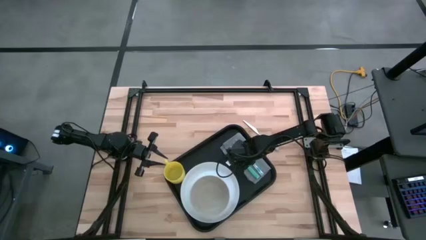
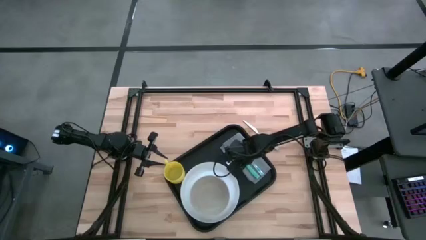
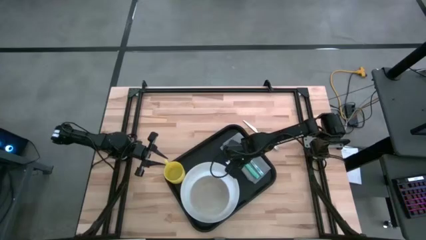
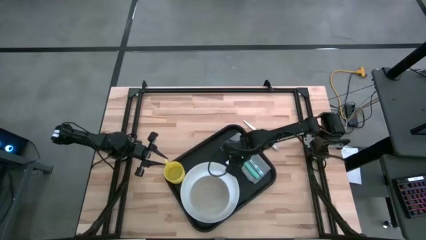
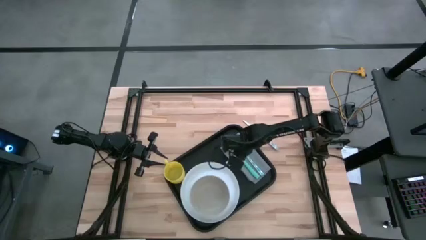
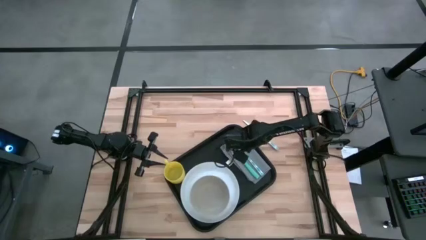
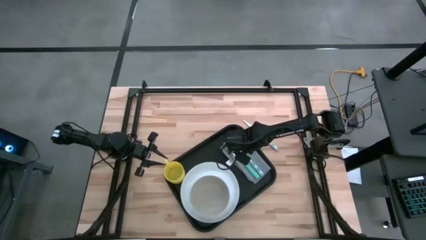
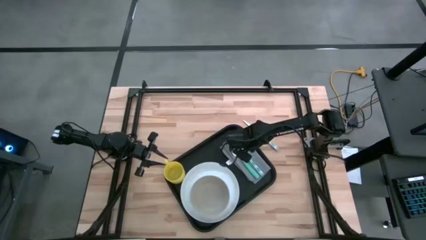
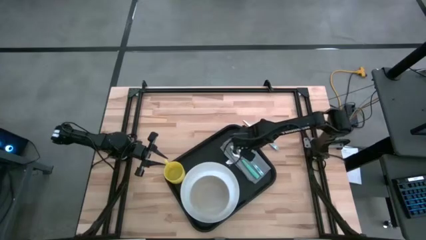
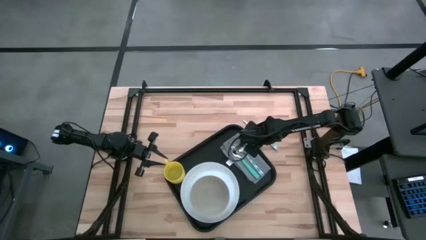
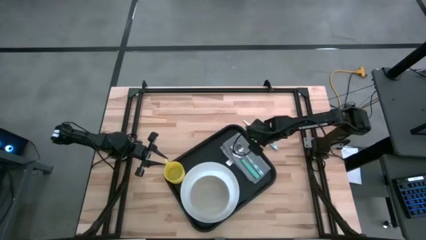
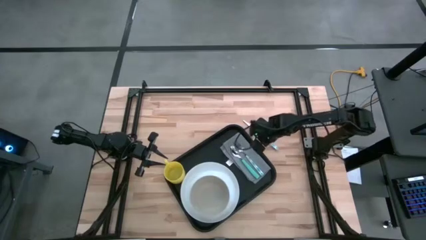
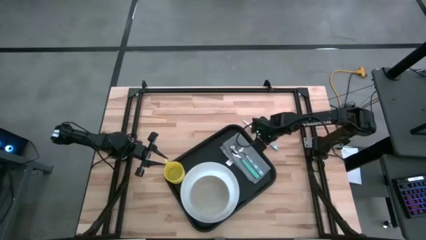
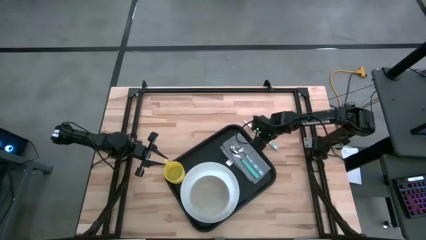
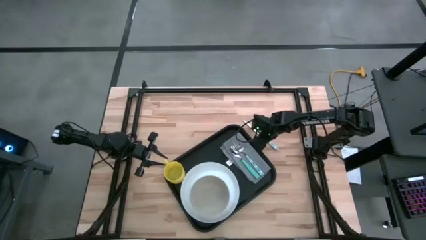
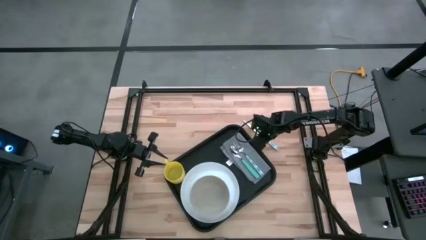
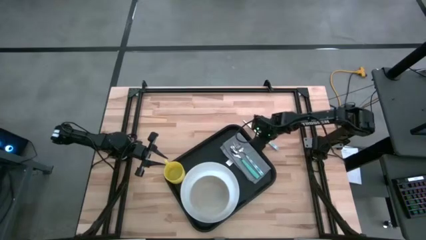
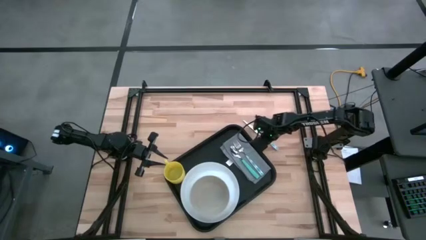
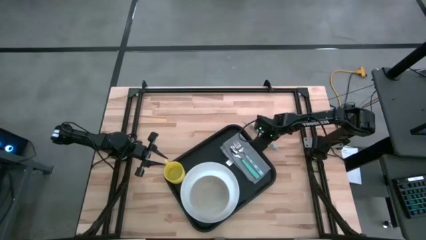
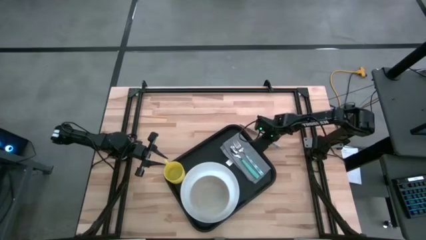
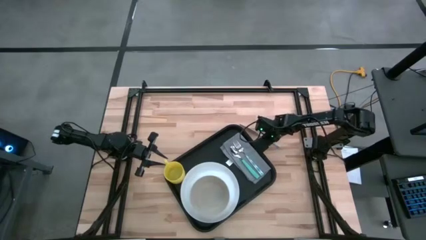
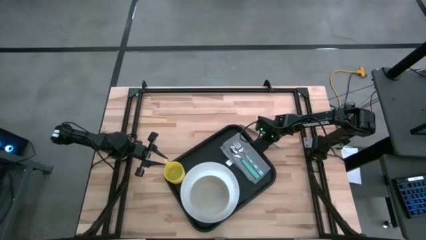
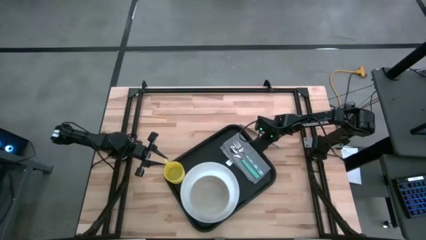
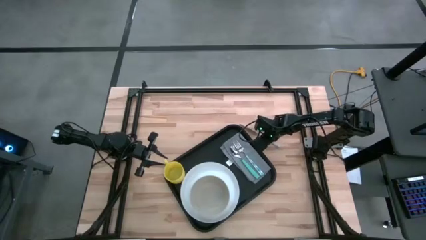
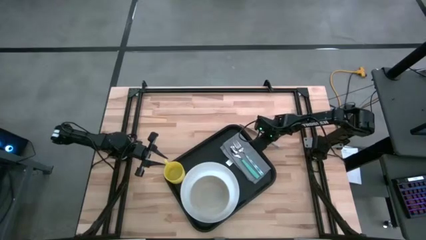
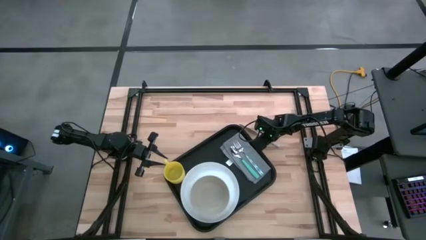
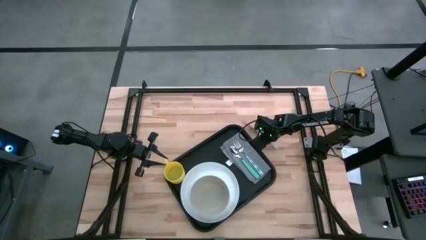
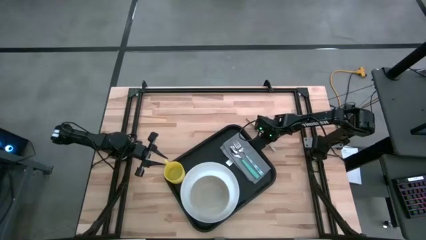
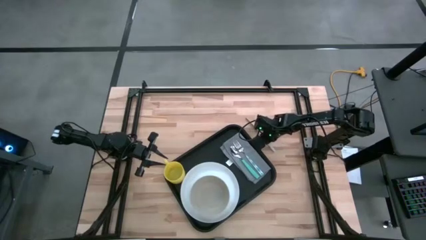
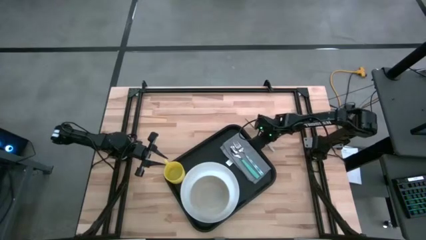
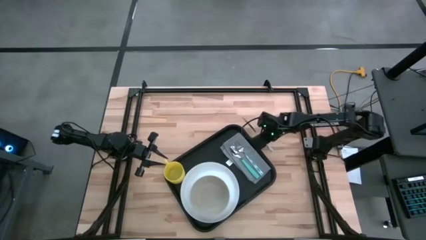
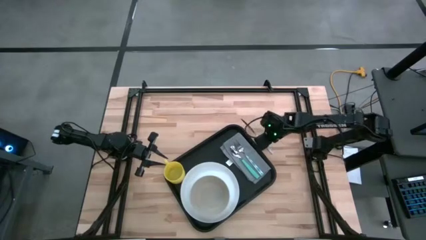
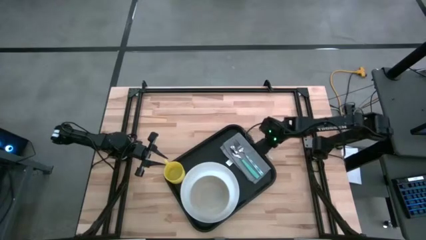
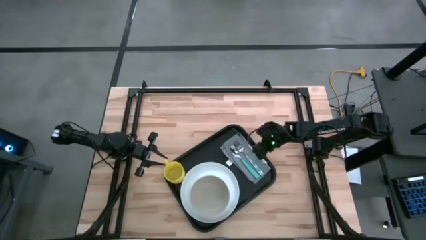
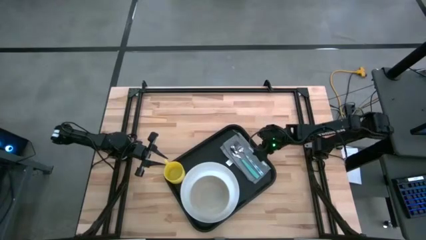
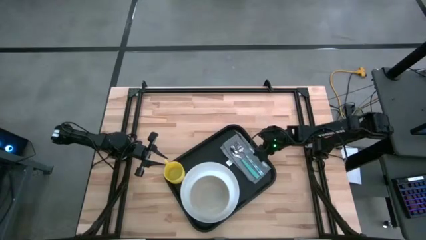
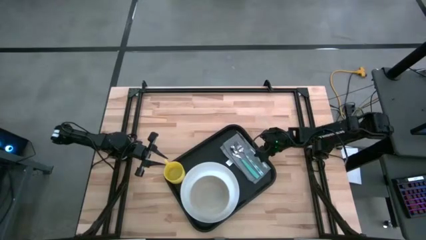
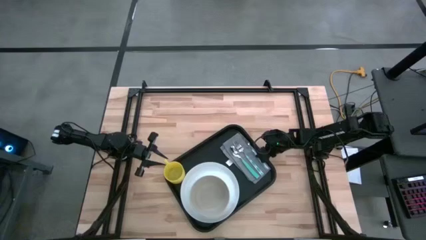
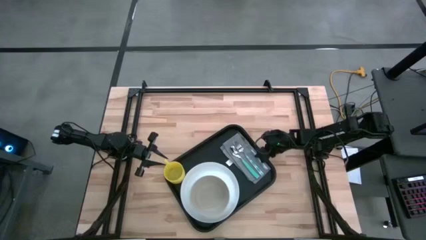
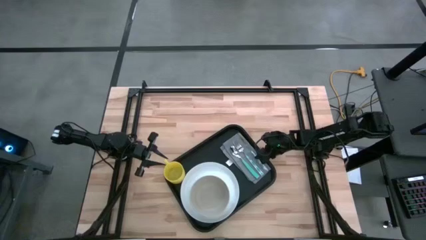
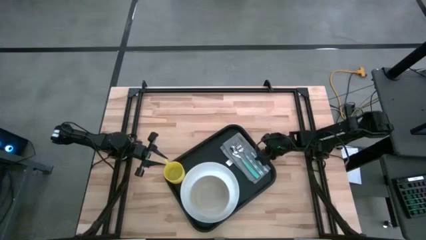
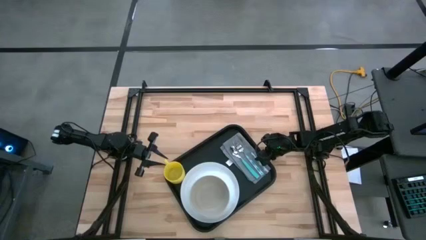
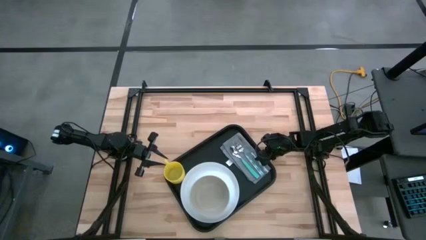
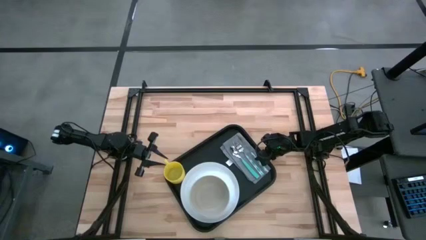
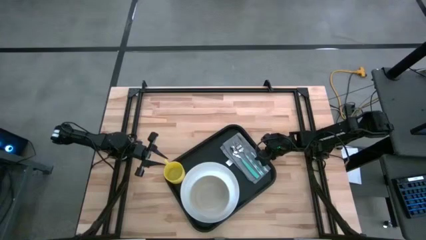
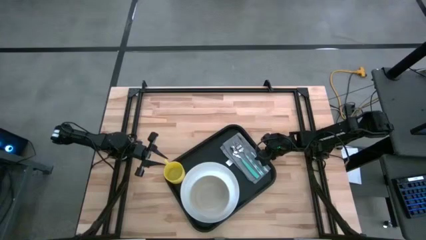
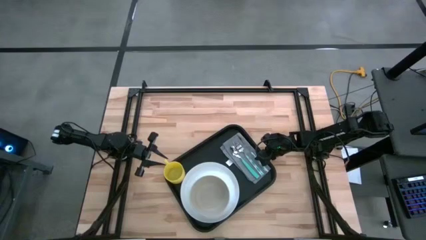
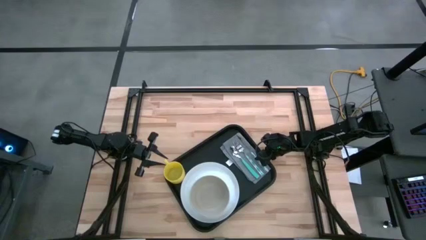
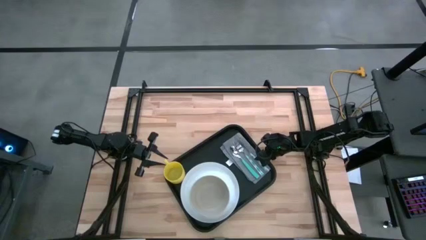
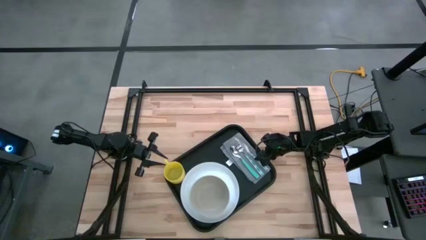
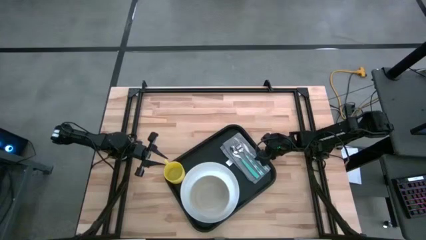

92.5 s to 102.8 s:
Task: Set up tray
Put the light blue knife on the gray napkin
